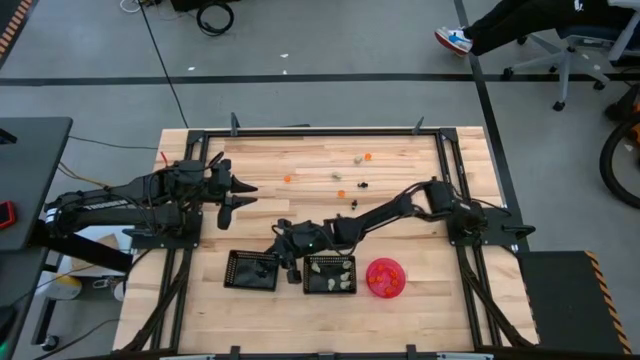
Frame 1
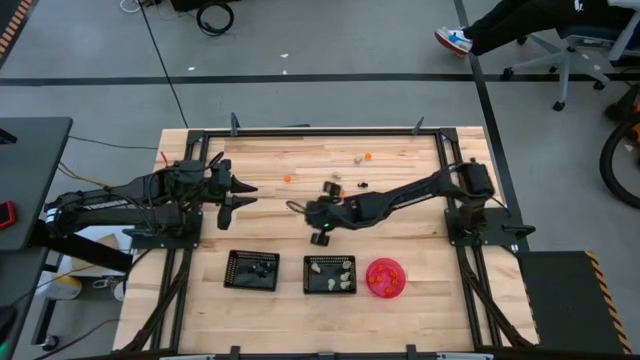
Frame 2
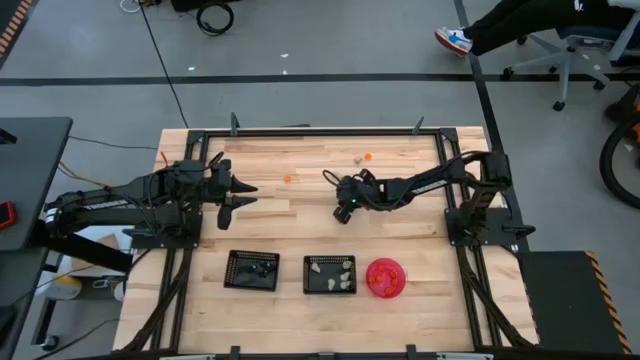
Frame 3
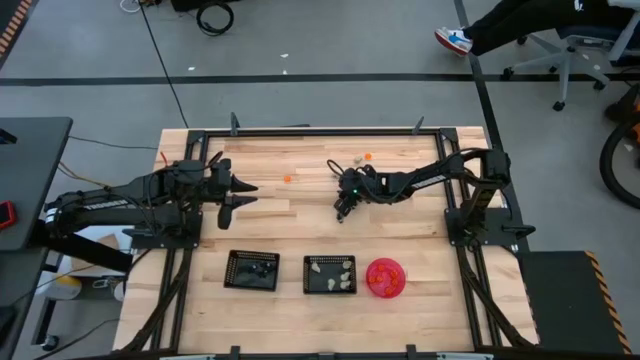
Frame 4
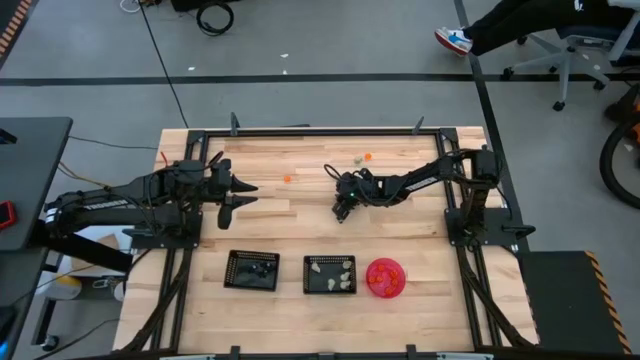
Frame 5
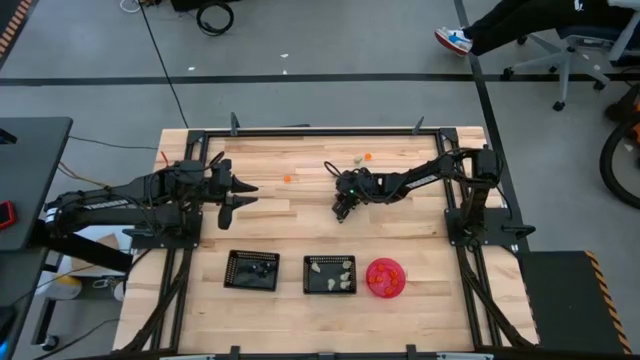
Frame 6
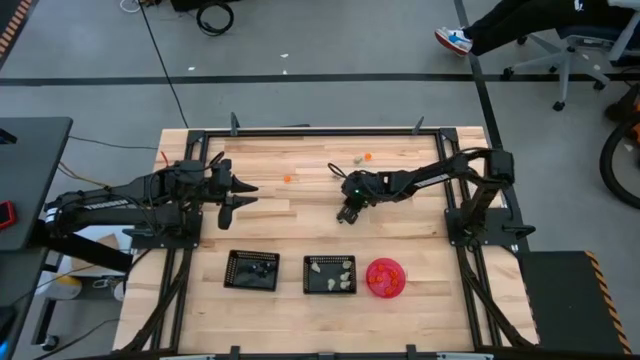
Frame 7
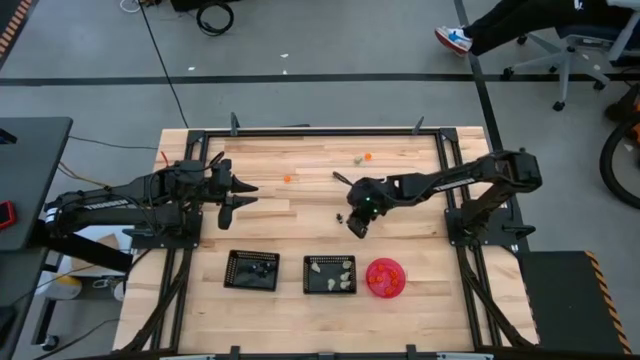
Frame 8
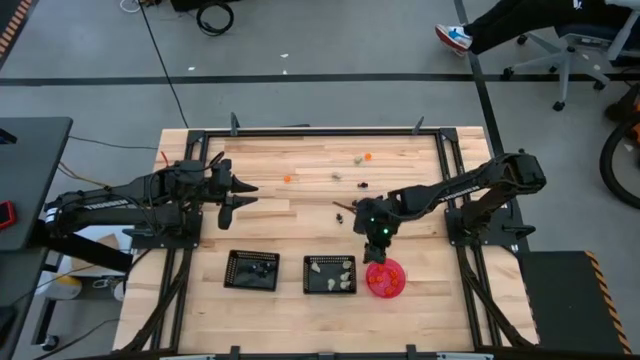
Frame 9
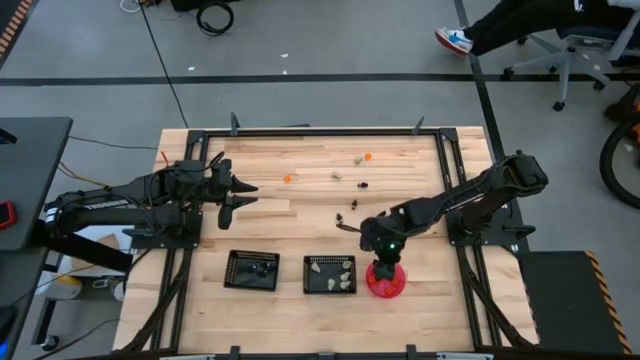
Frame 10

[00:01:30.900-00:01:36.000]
Task: Sort Halloween decoration
Put the orange pumpkin toy into the pink bowl

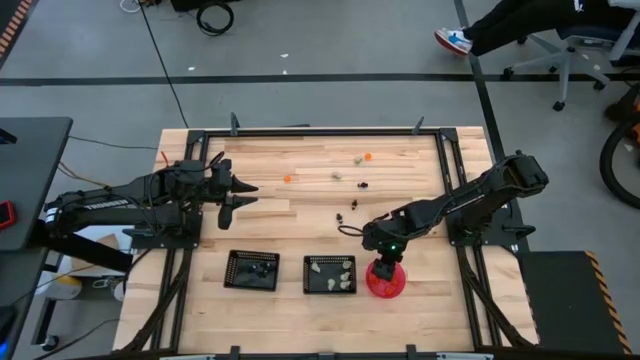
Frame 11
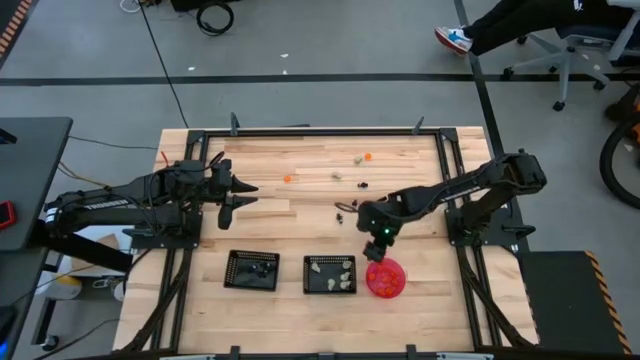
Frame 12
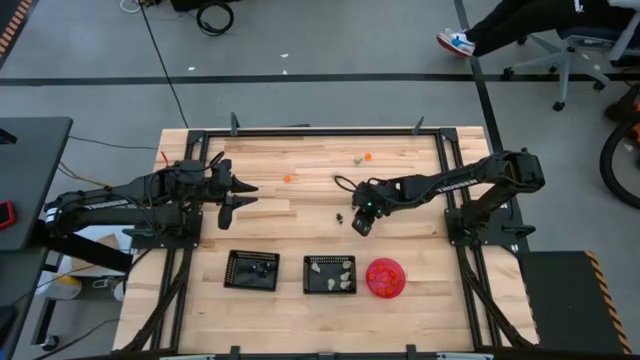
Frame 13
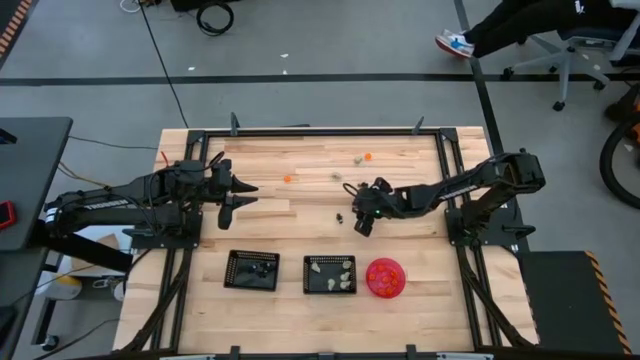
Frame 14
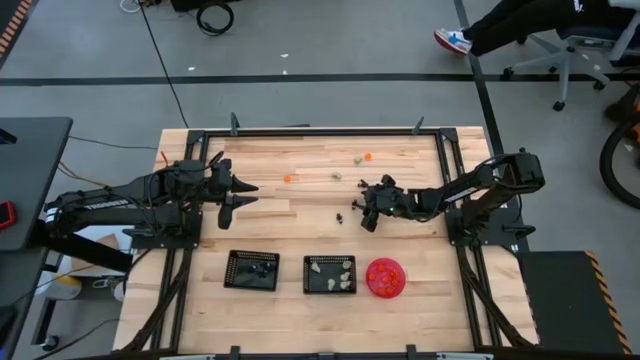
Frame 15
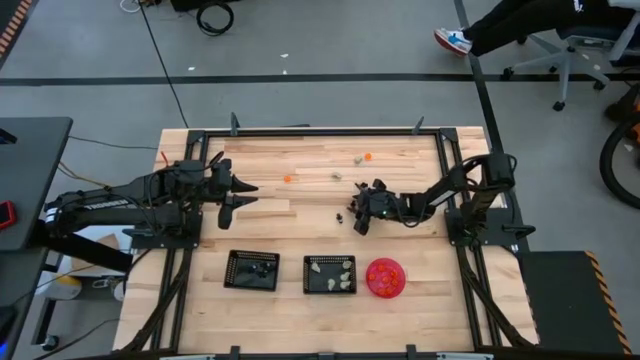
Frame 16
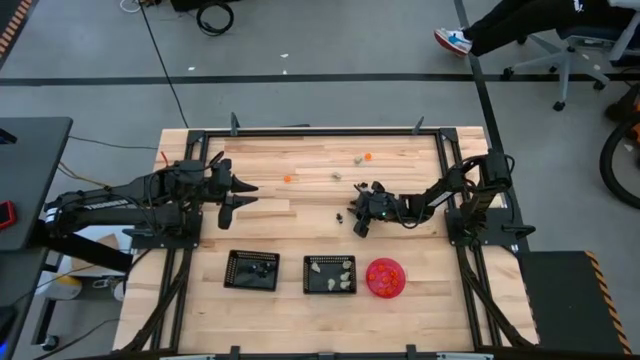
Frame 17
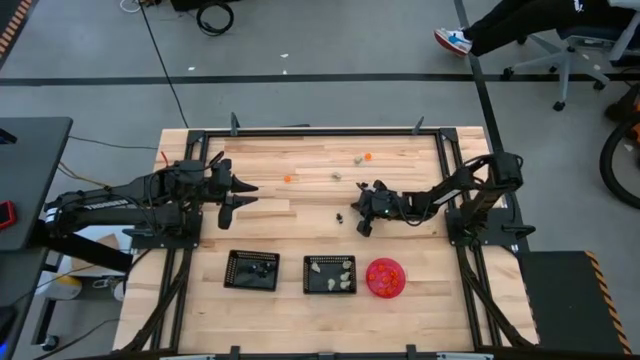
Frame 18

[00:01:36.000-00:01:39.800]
Put the black skeleton toy into the left black bin

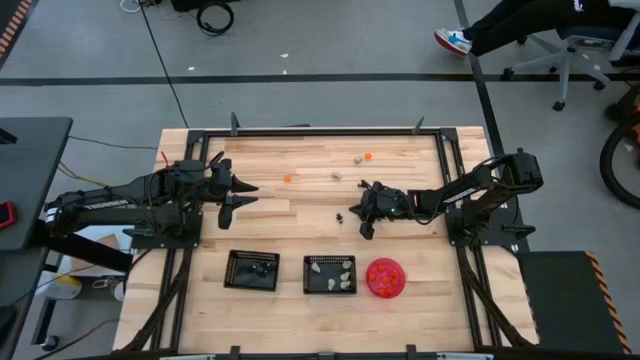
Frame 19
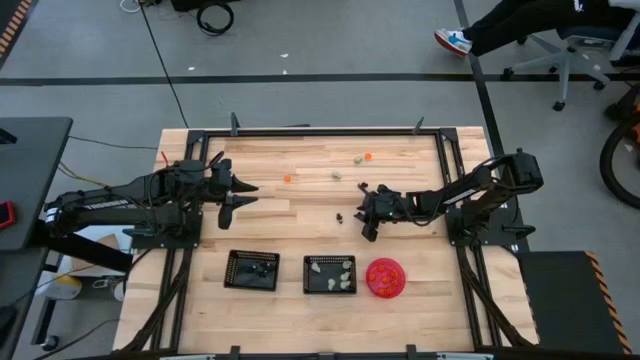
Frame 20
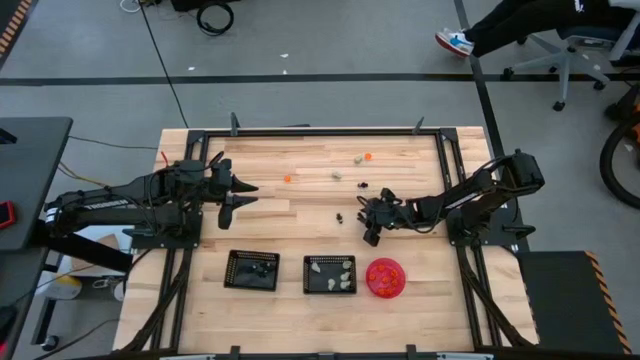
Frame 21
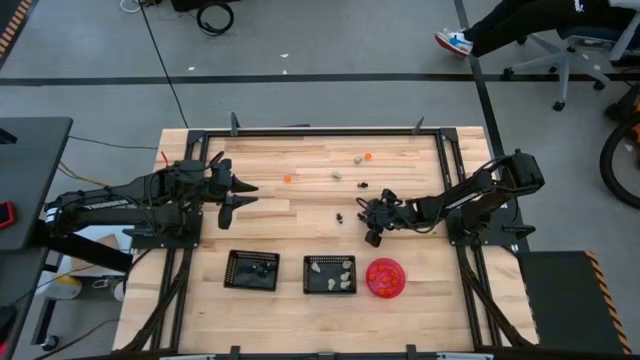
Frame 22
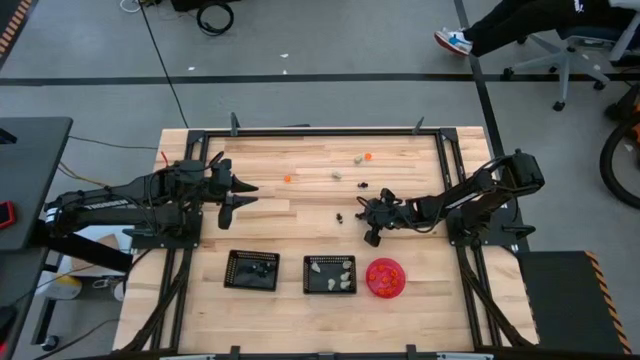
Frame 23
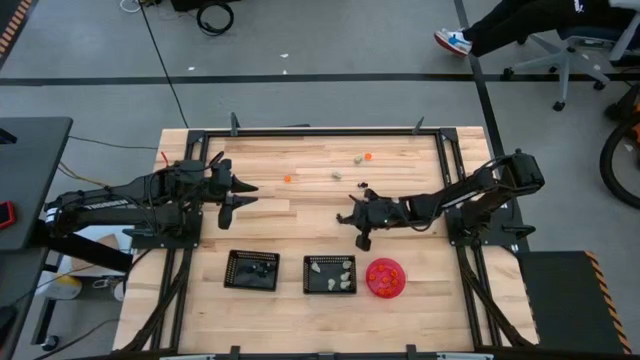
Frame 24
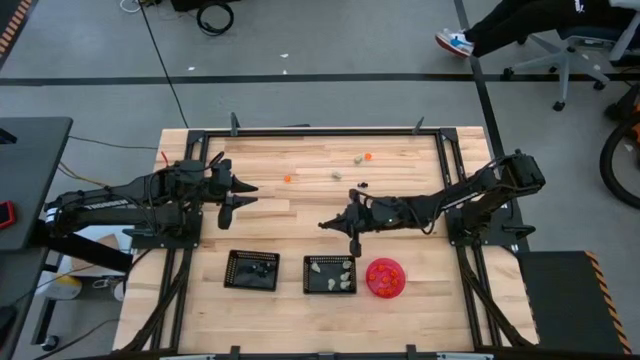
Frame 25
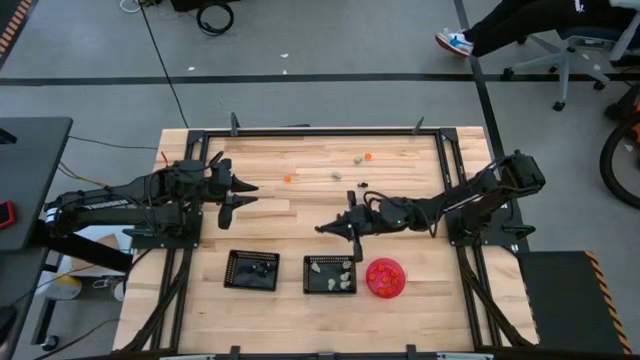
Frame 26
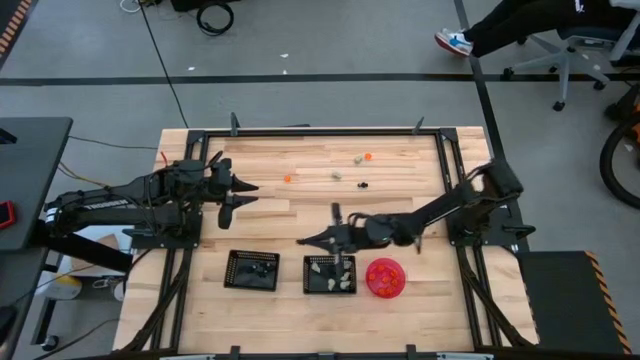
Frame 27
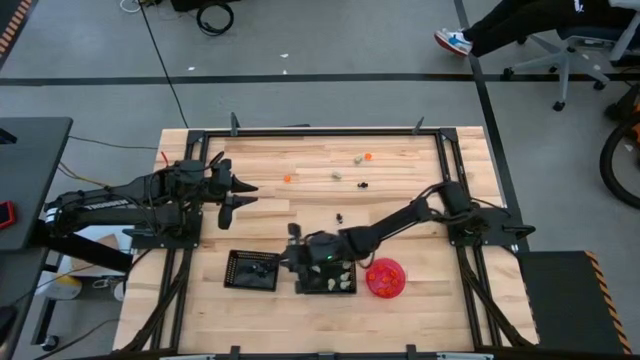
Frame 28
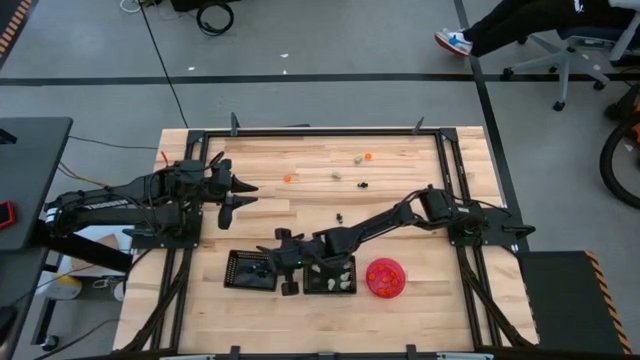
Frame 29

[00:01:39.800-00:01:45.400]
Put the black skeleton toy into the left black bin

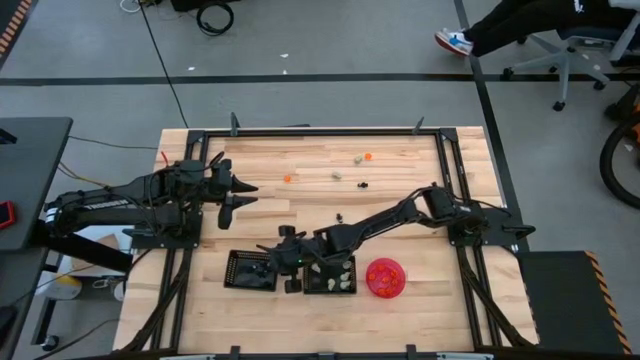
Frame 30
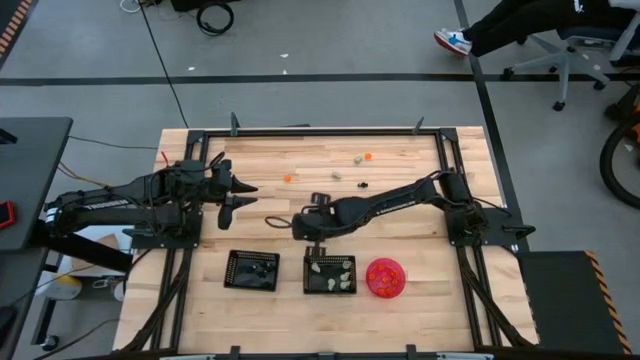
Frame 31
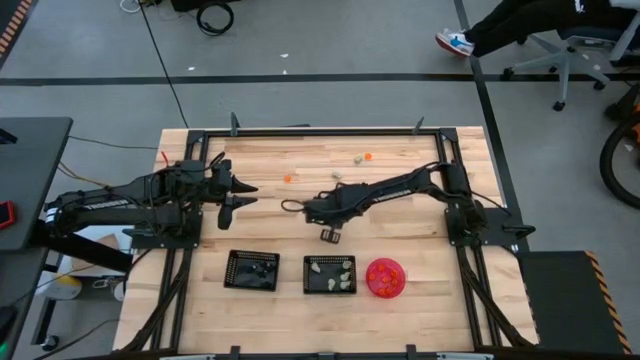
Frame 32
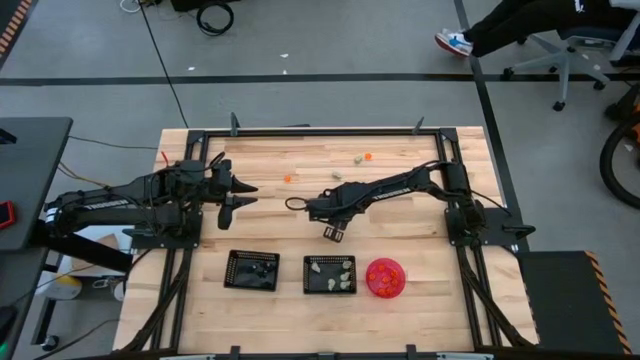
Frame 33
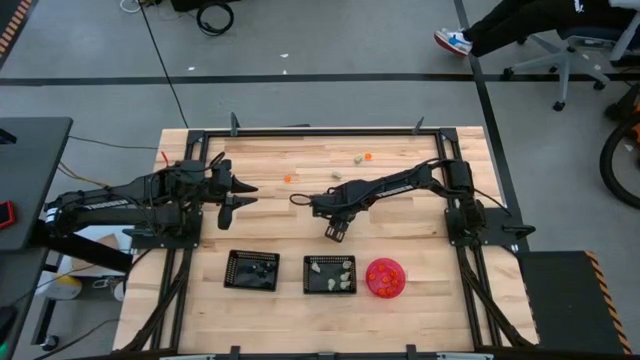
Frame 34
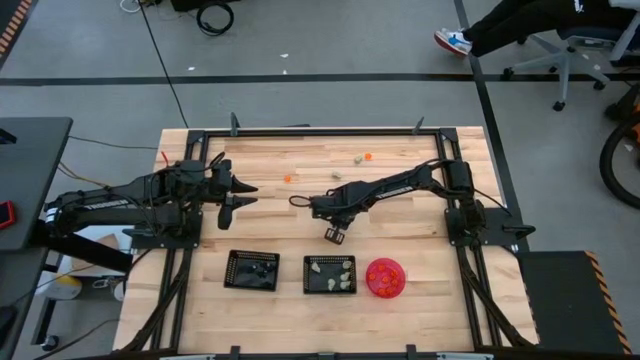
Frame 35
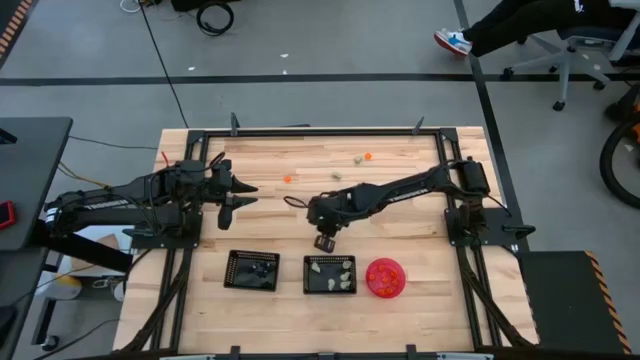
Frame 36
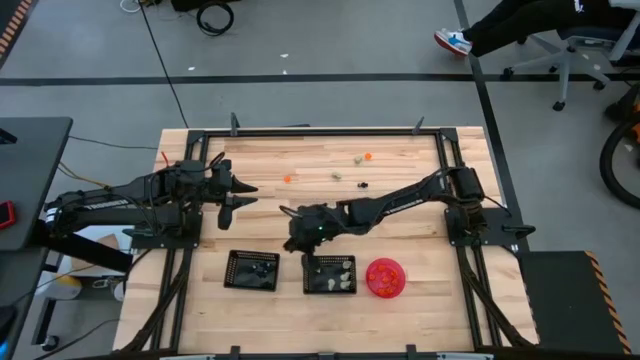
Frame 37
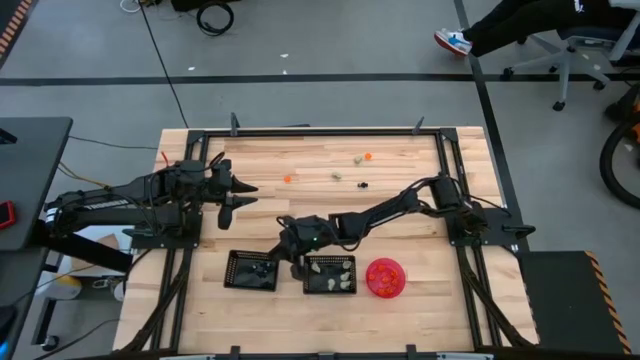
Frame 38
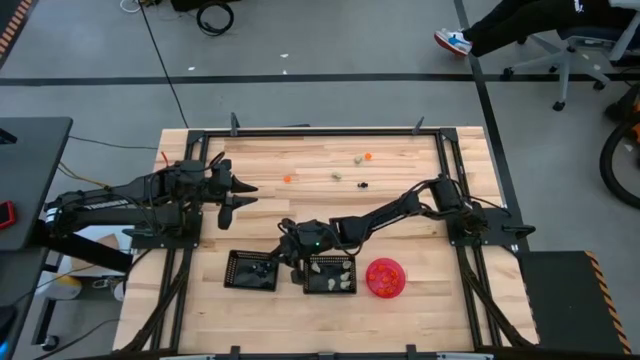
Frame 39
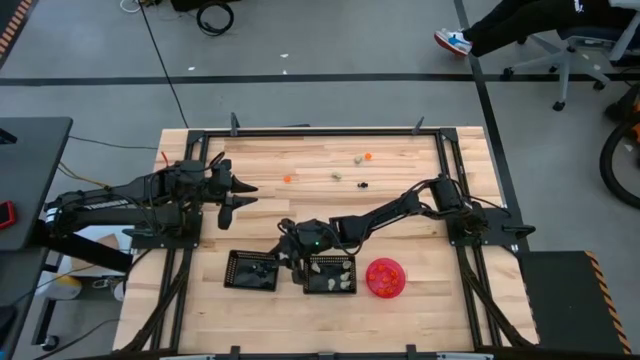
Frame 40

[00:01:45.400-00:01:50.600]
Put the black skeleton toy into the left black bin

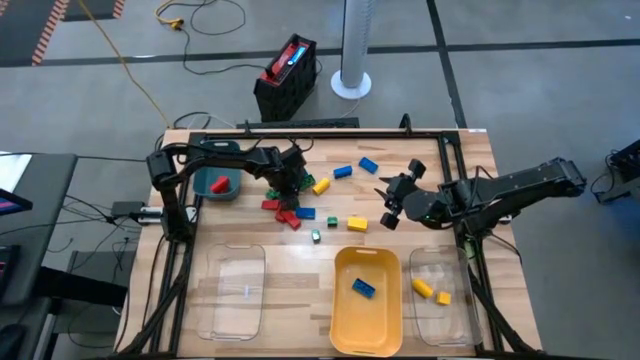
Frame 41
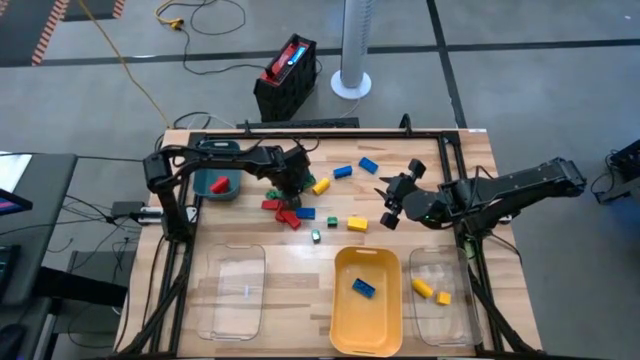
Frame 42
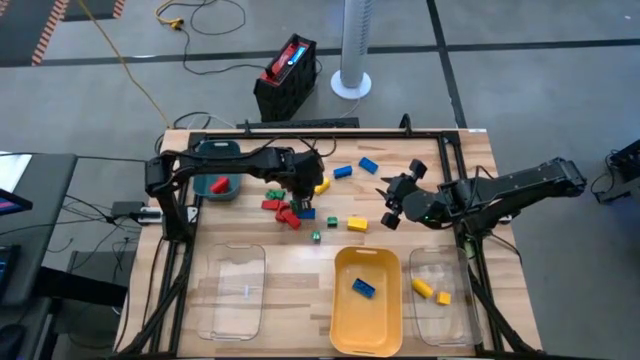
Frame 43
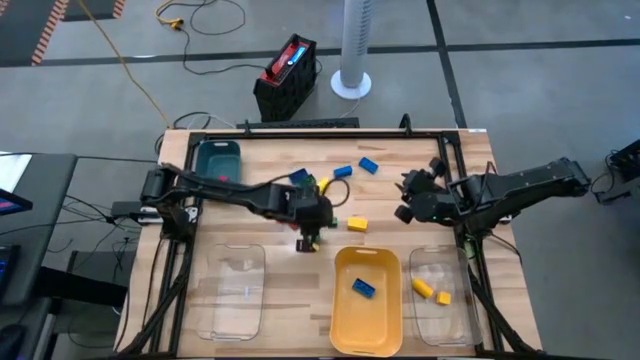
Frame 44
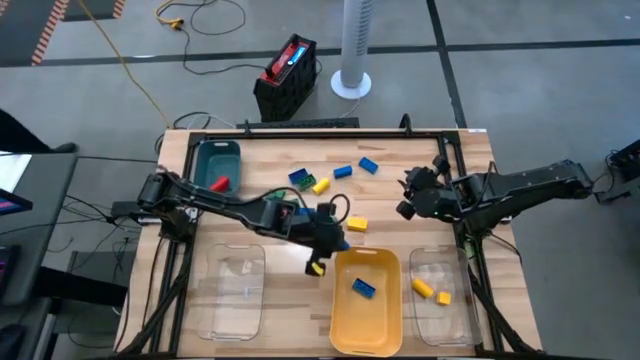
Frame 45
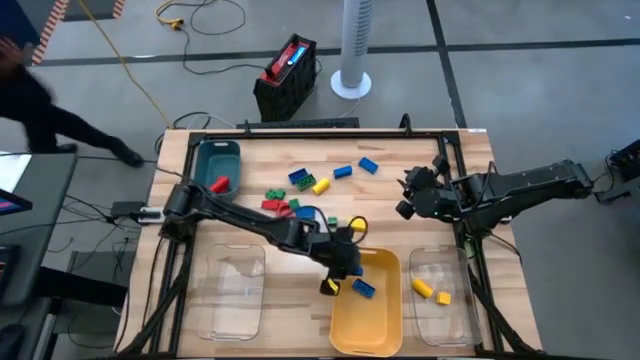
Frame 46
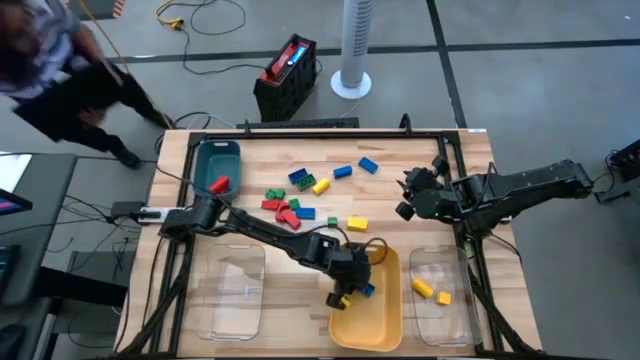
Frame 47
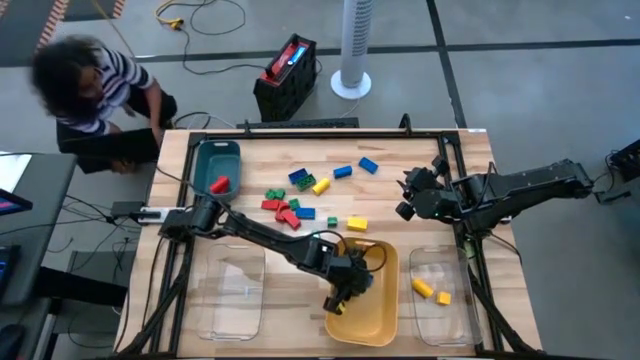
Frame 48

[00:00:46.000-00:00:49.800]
Task: Sort blocks
Put the blue game piece into the yellow bin
